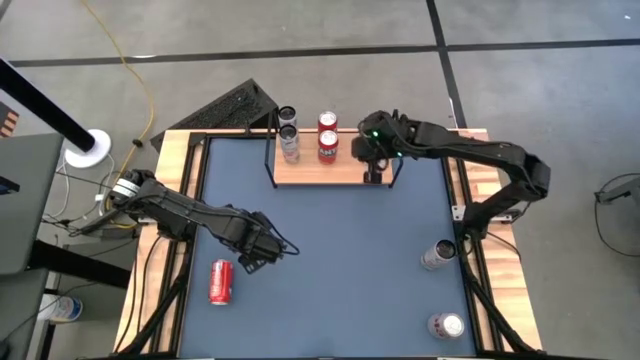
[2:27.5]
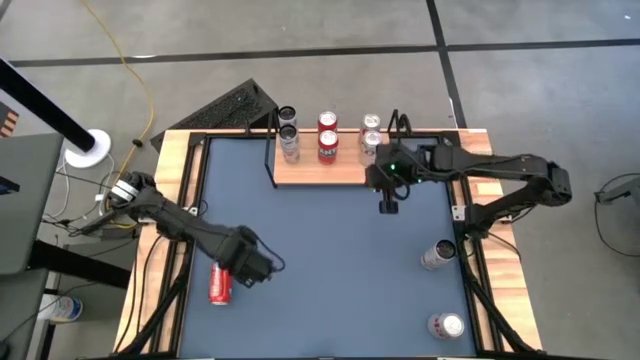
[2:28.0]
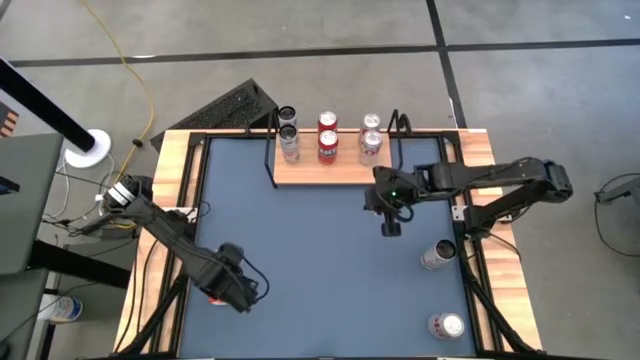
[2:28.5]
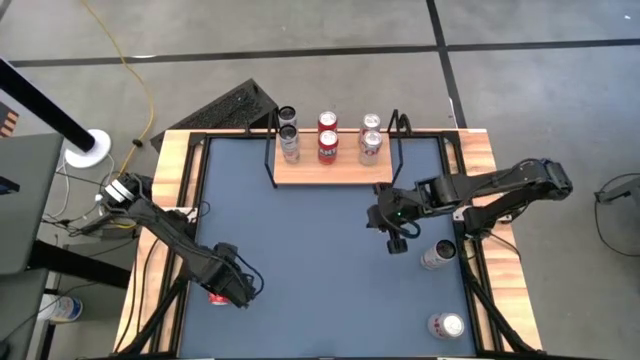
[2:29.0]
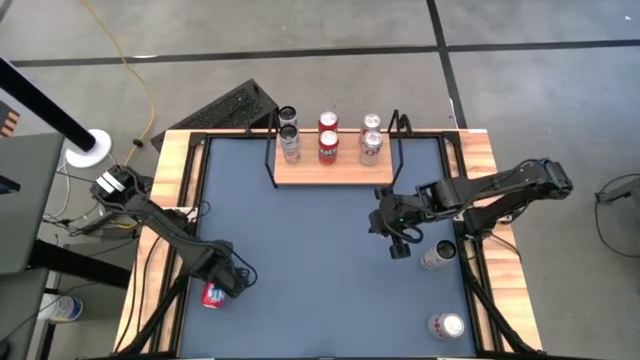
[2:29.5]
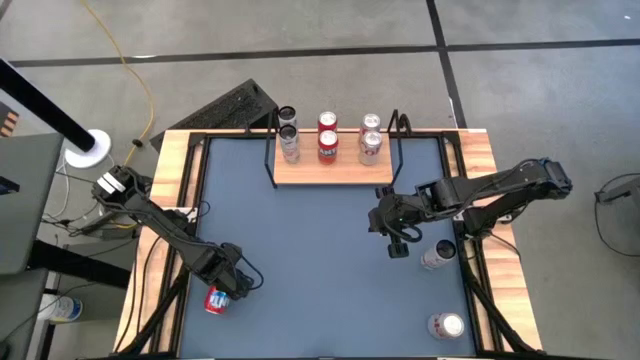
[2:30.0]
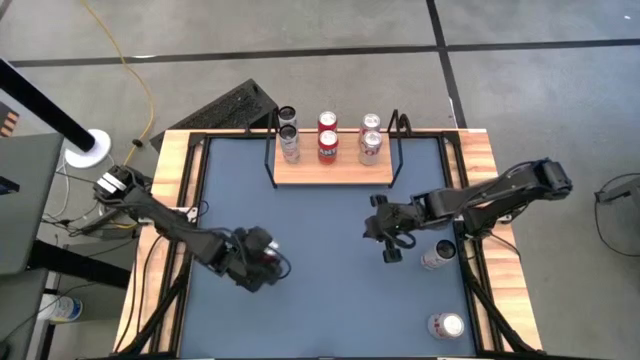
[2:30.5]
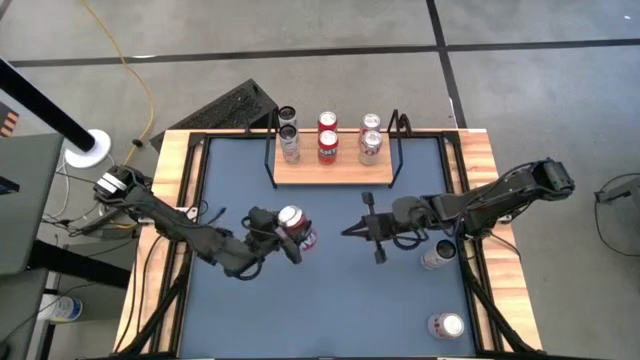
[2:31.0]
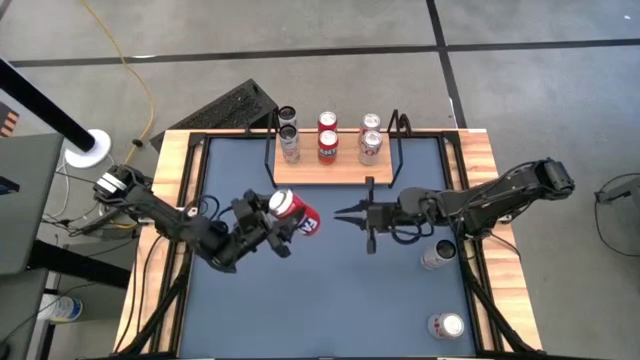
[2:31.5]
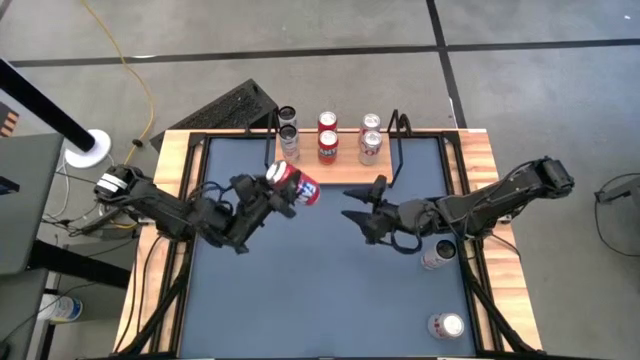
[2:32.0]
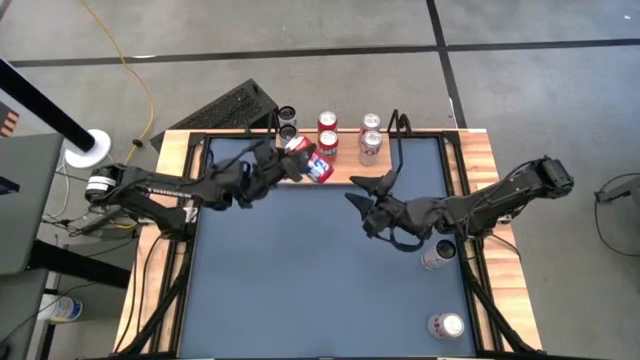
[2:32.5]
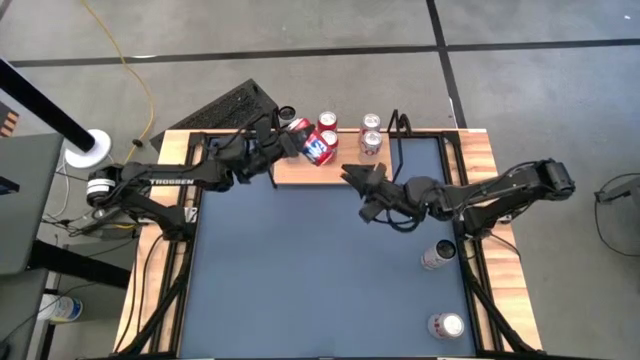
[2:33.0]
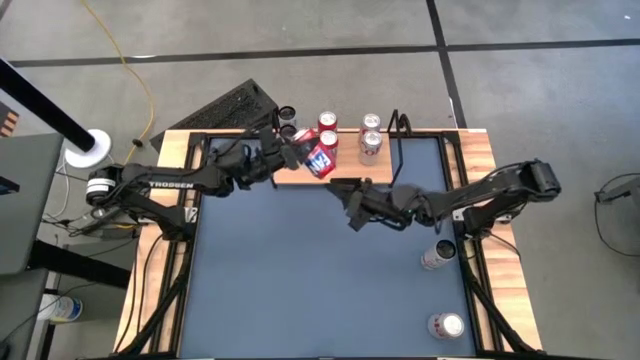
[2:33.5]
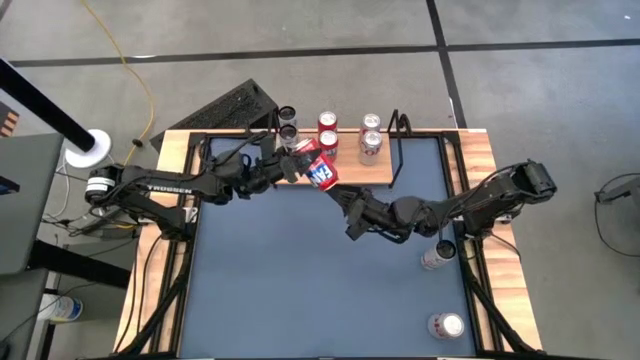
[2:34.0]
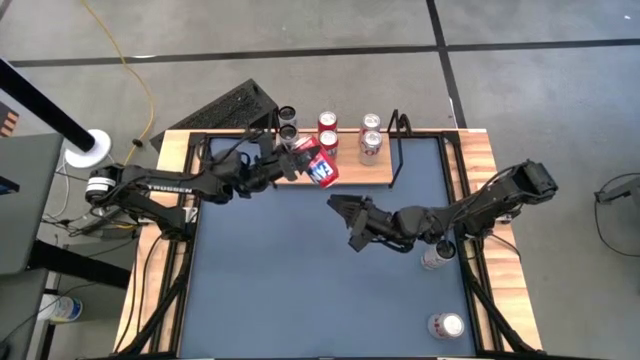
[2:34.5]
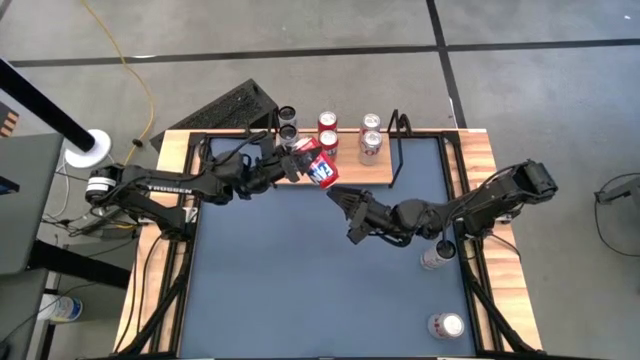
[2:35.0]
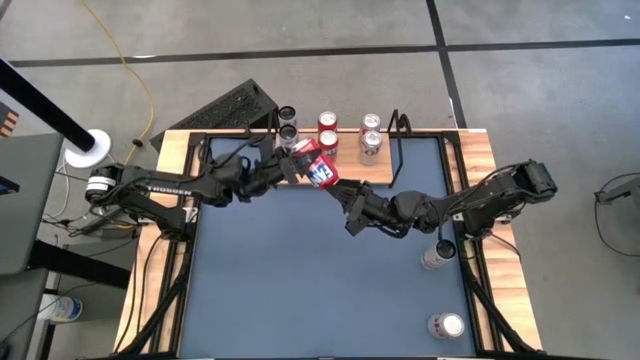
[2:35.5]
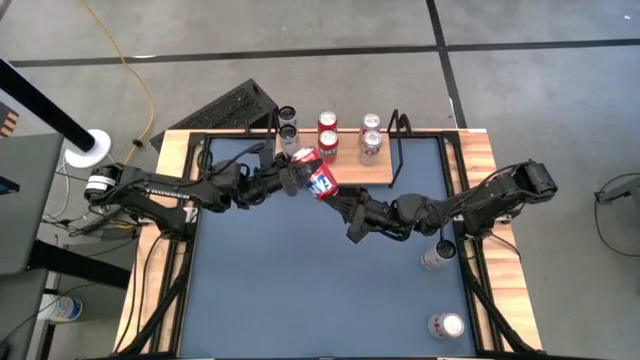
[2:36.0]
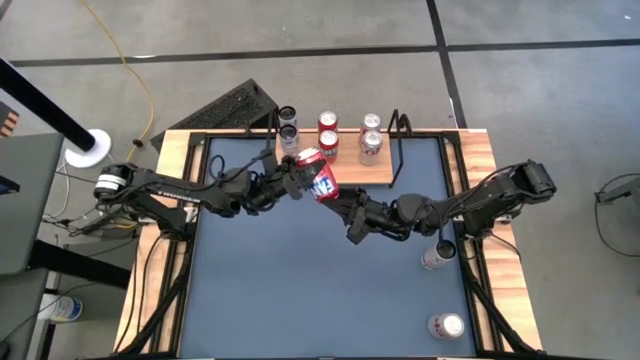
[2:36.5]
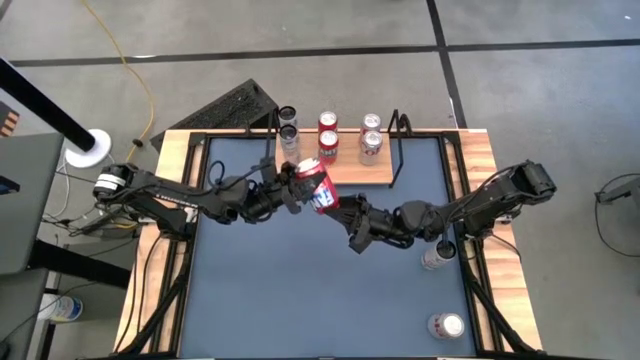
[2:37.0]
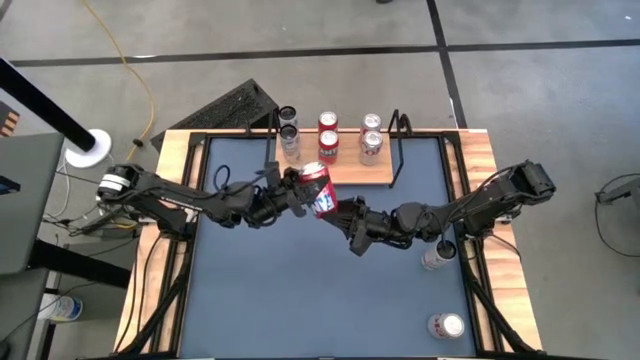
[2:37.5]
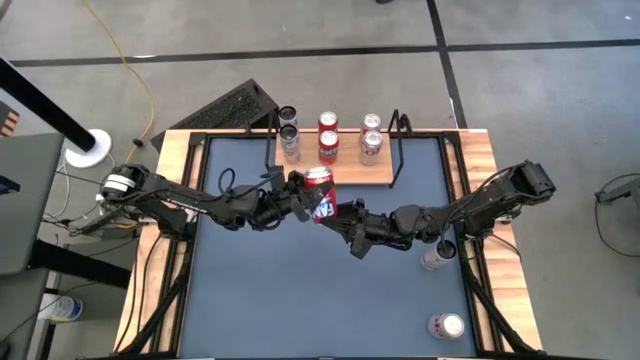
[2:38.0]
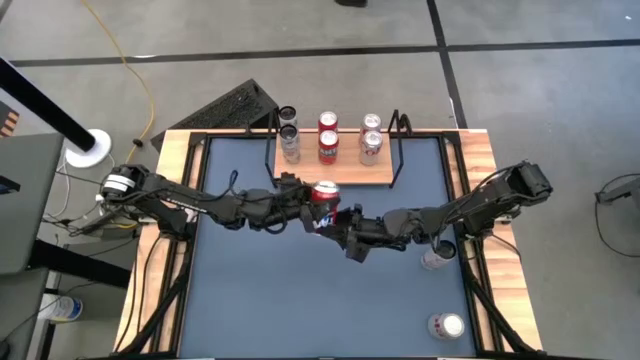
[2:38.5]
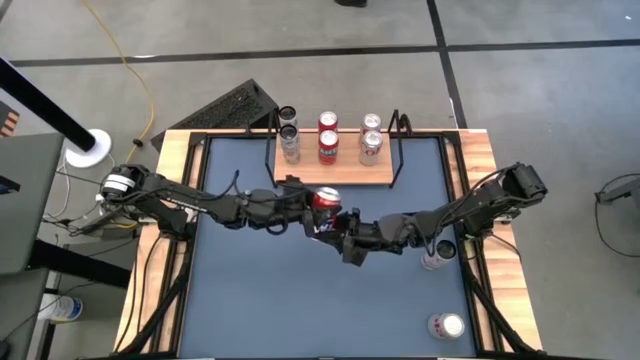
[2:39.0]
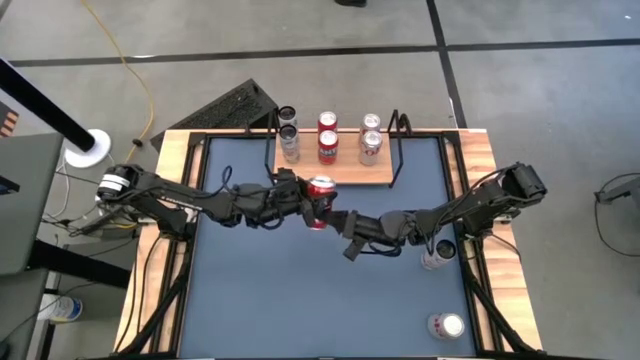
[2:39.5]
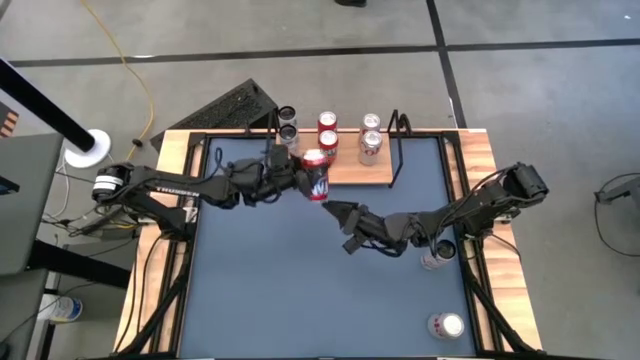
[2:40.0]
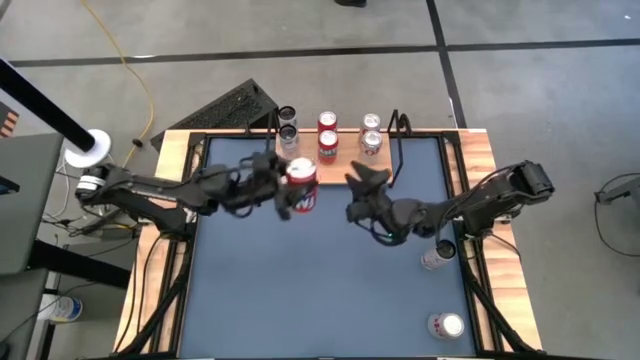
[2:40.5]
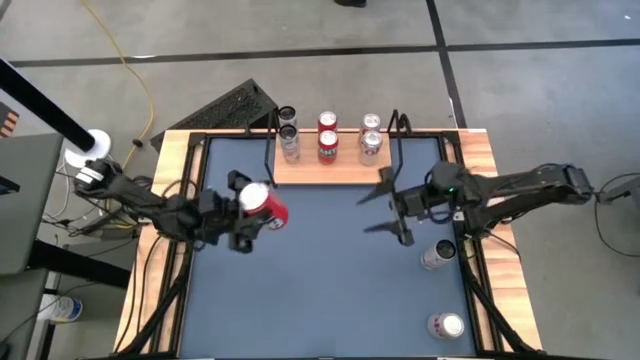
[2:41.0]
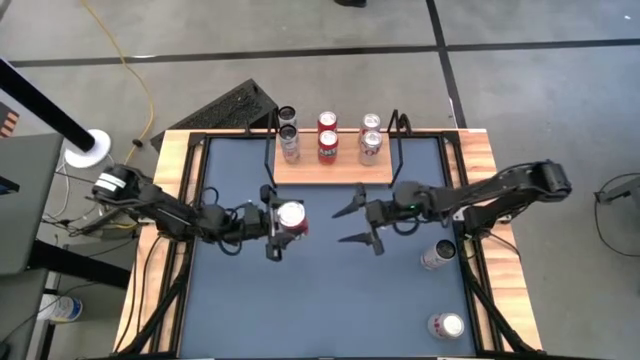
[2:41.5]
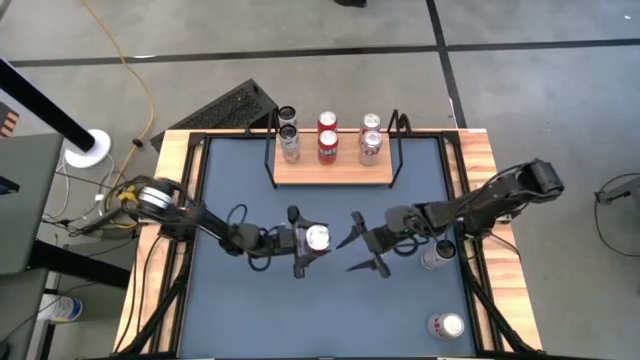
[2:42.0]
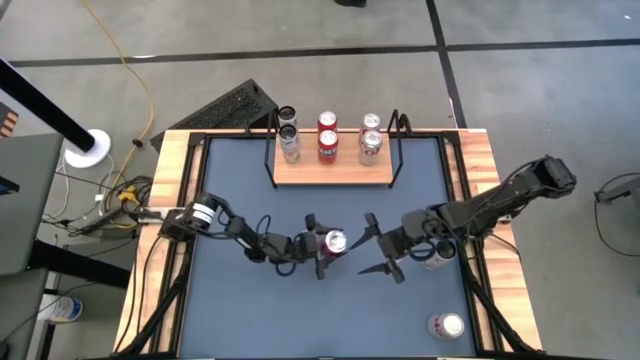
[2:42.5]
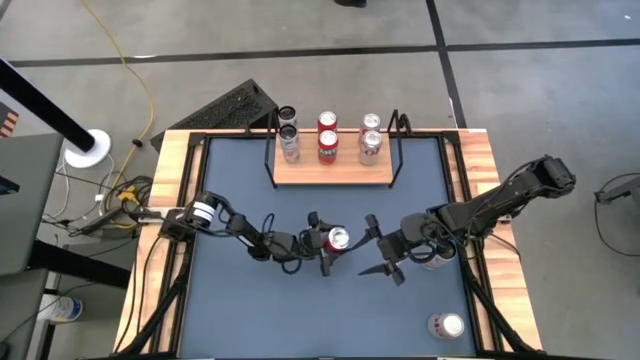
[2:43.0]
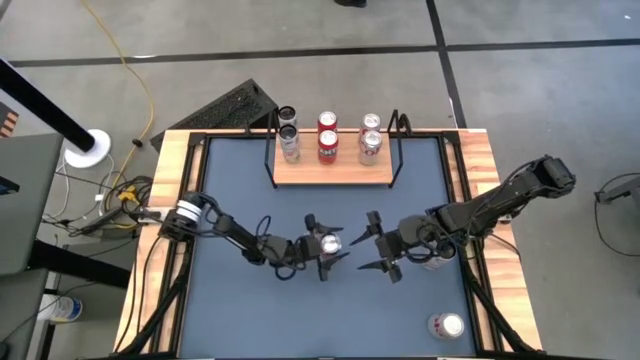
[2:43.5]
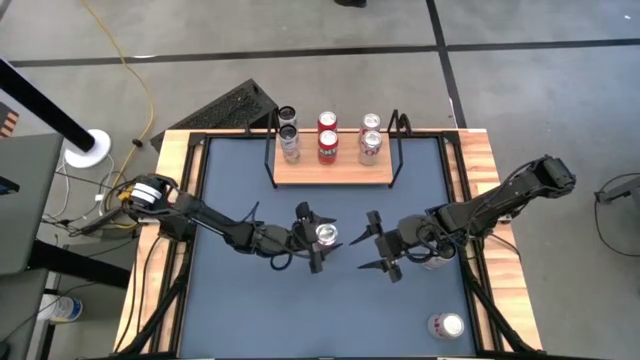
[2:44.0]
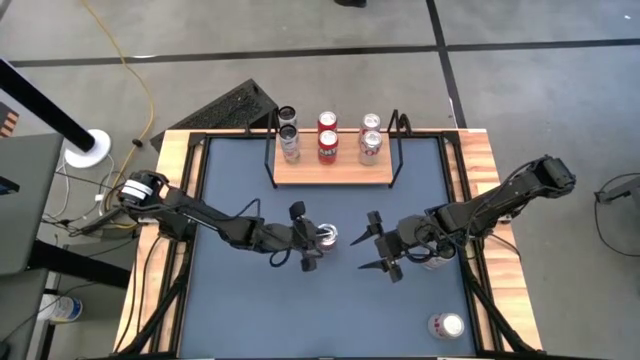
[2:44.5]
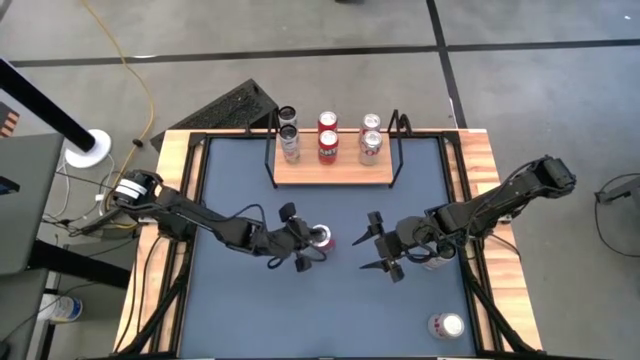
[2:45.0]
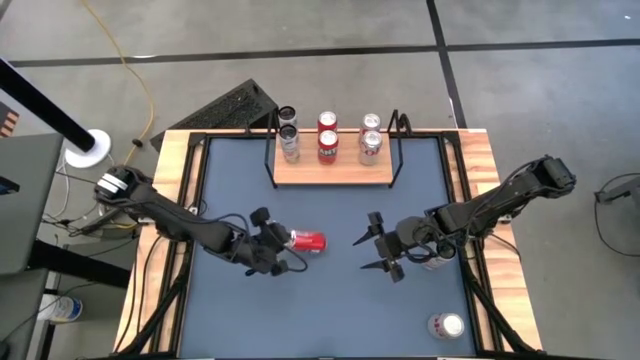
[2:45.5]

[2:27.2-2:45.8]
Task: Place canned beverage on shelf
Put the red soda can on the shelf aligned with the other red soda cans

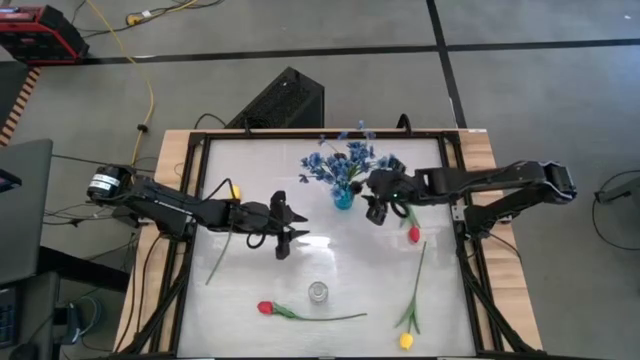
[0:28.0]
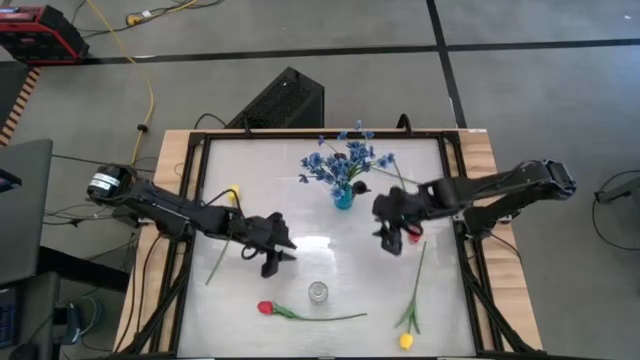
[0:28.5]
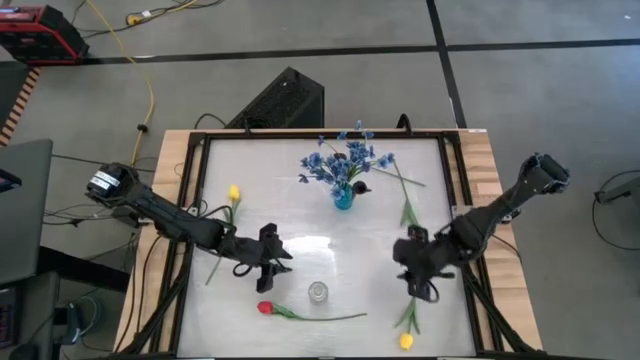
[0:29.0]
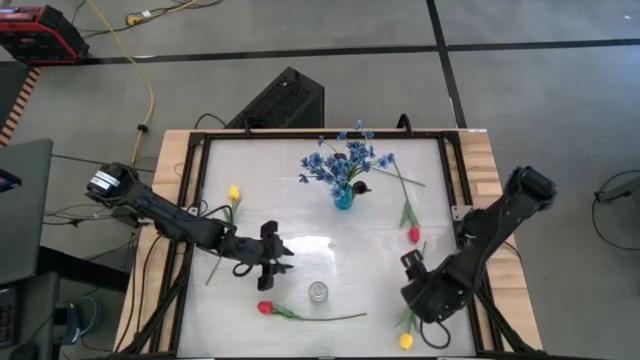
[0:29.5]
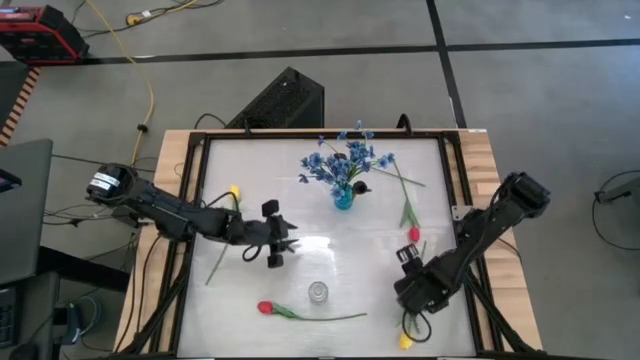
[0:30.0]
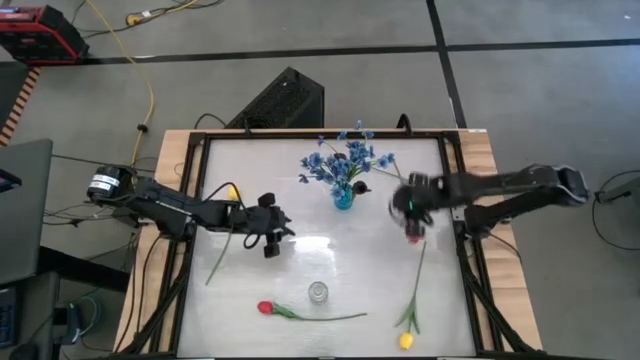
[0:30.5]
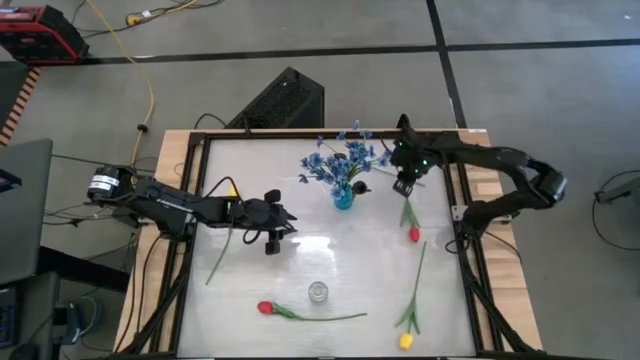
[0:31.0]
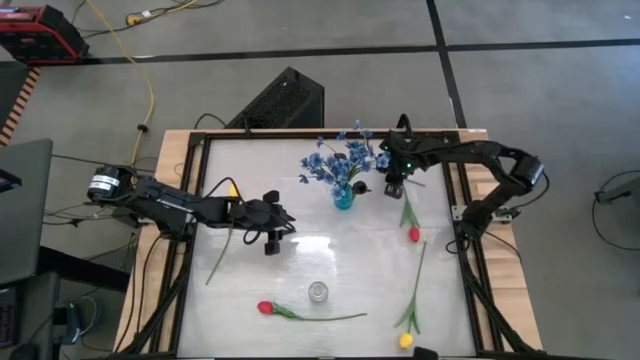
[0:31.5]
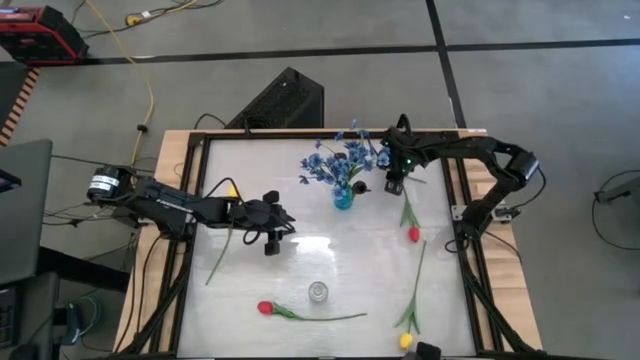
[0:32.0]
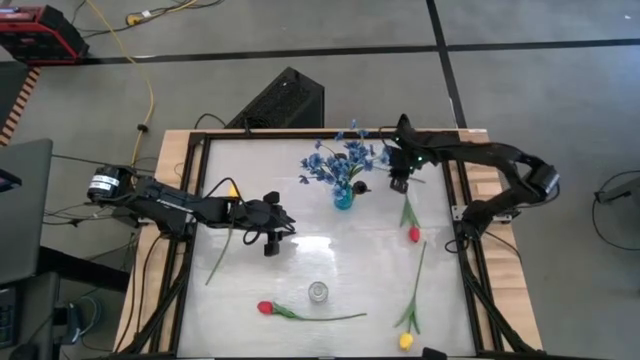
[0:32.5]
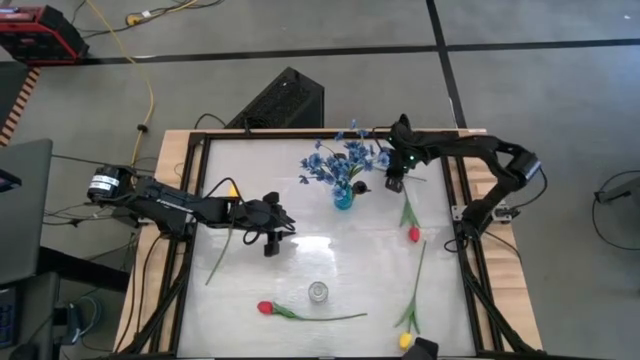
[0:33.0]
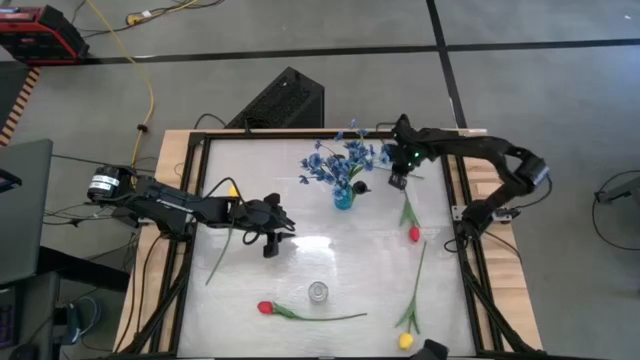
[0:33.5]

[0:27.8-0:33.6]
Task: Sort flowers into vase by color
Put the black flower into the blue vase
